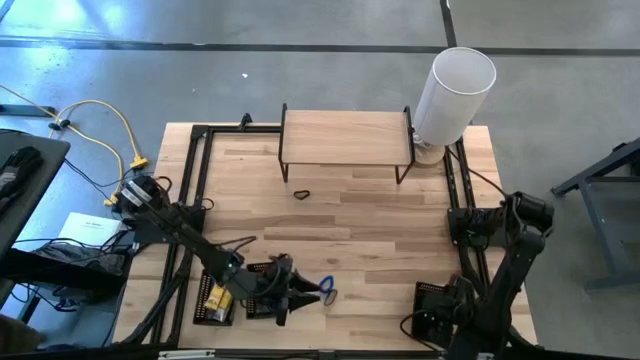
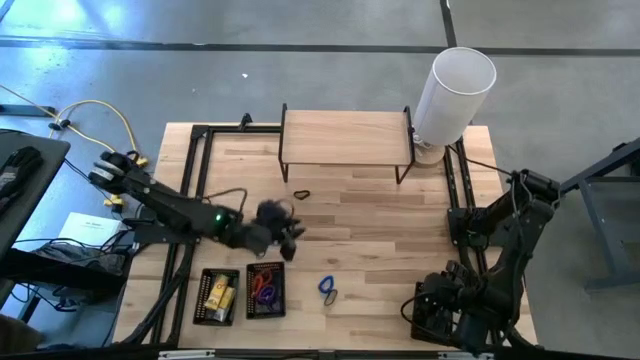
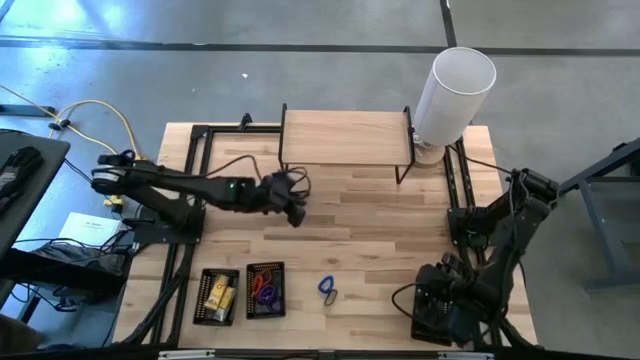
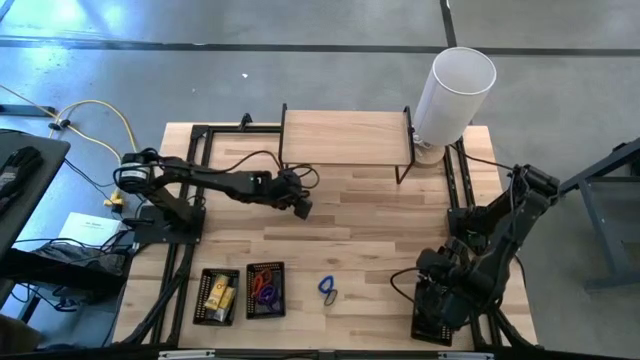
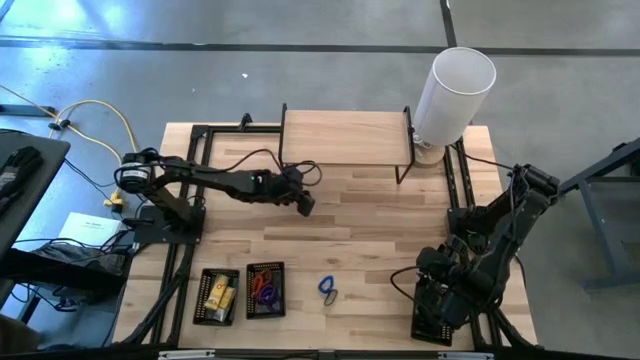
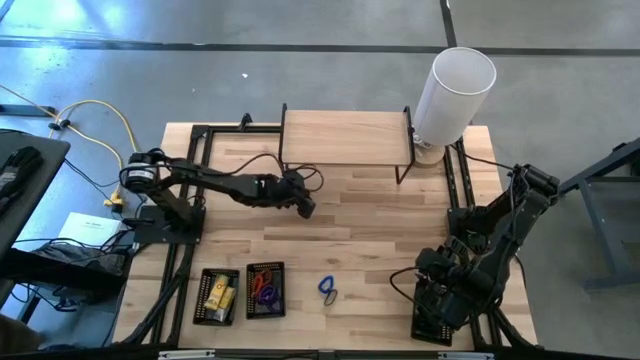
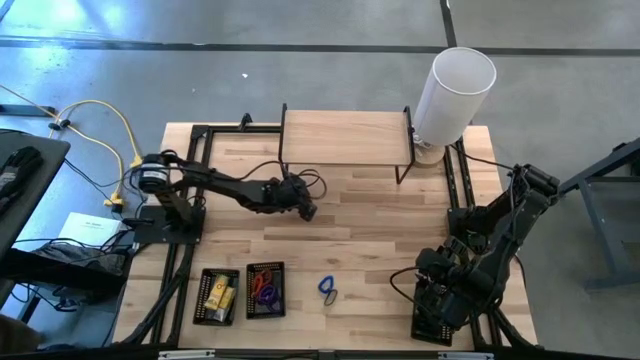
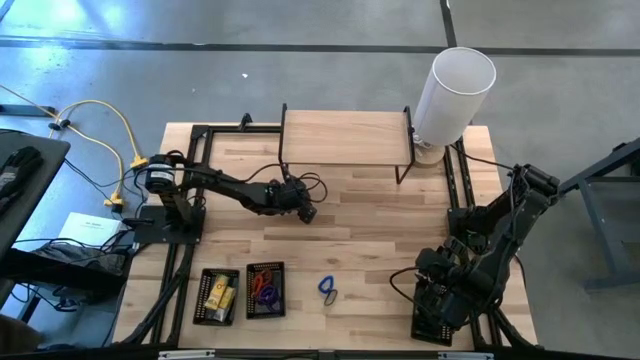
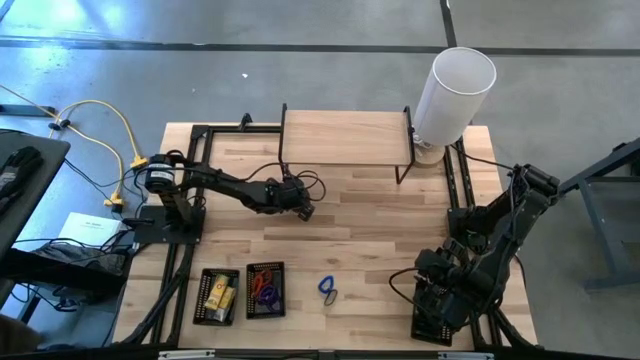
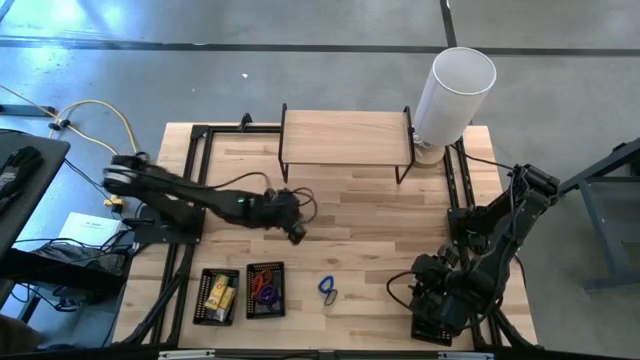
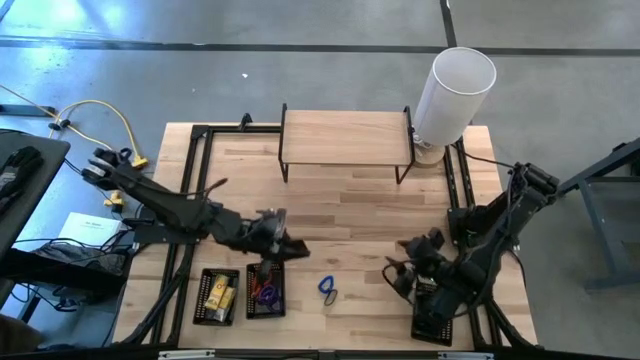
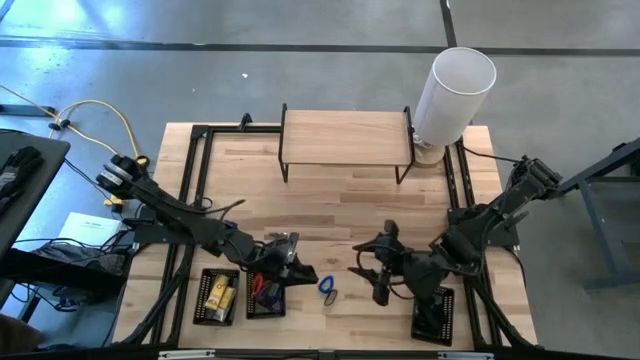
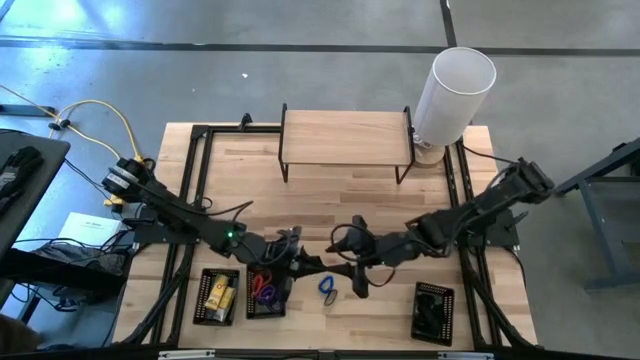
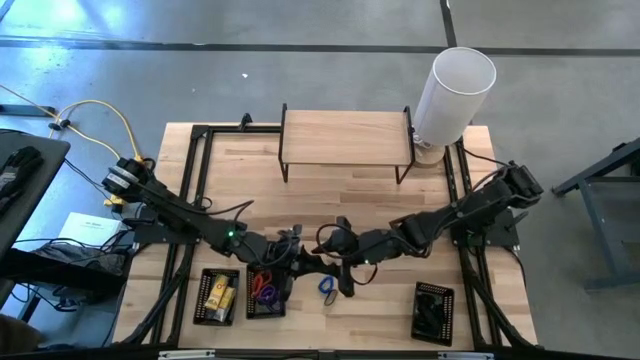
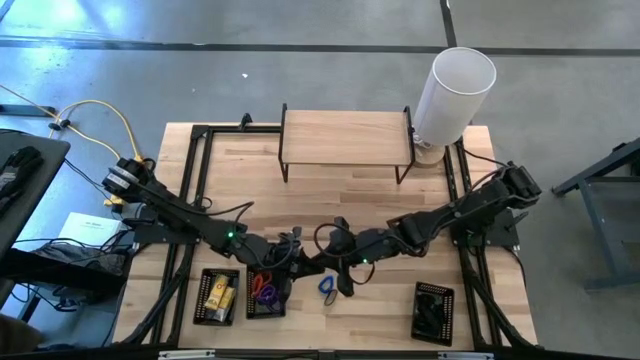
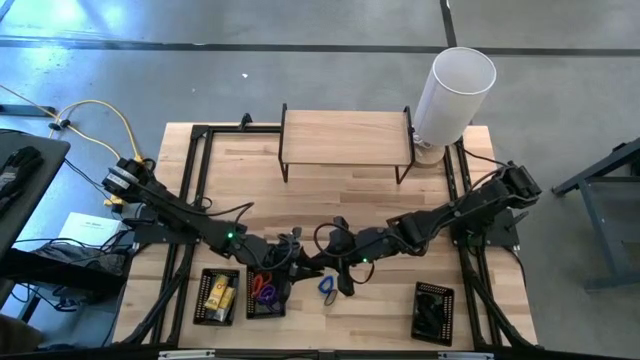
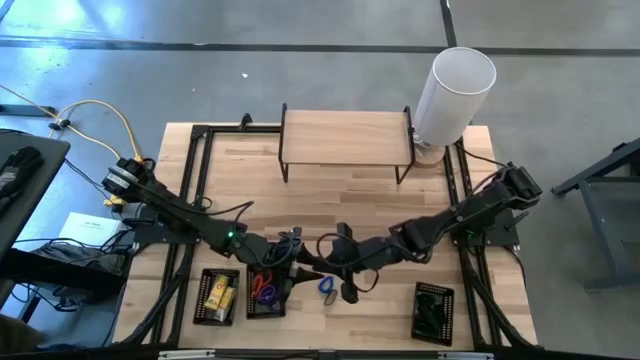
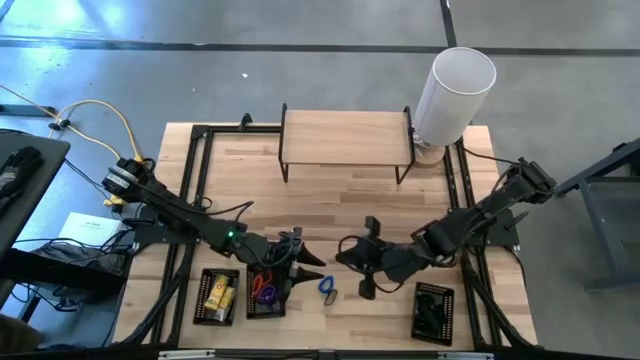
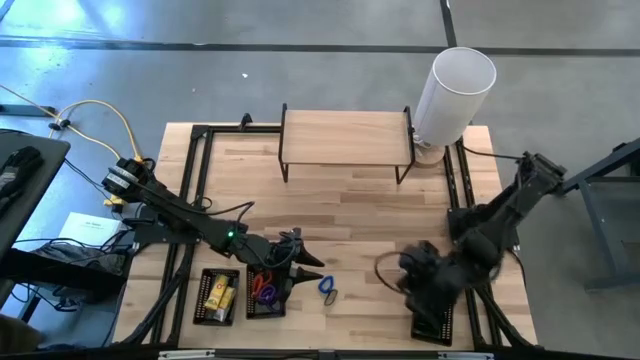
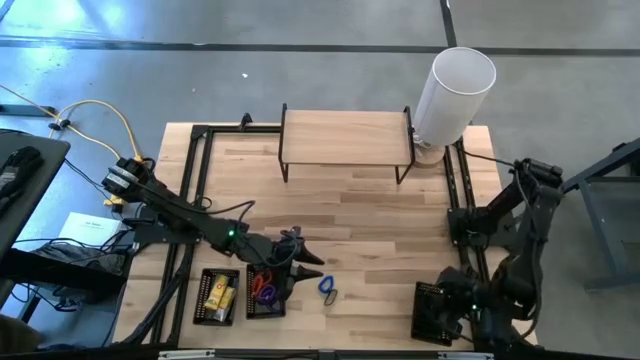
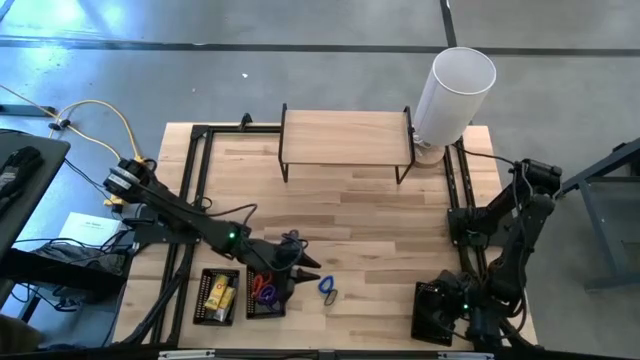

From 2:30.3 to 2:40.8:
Task: Pick & Place Office Desk Supplies
Put the black rubber band into the right black basket

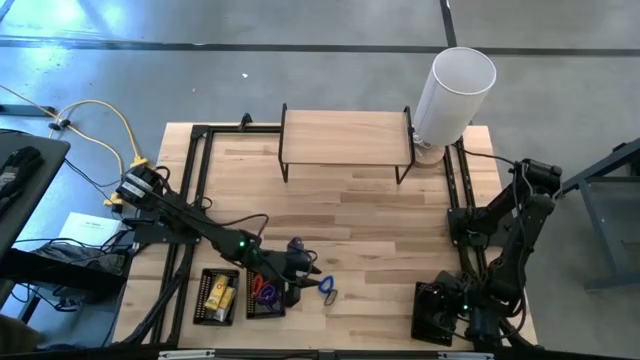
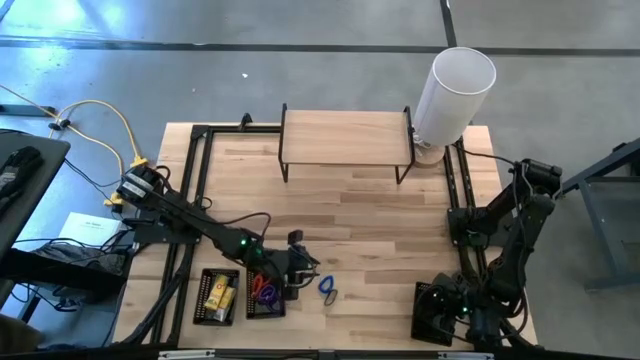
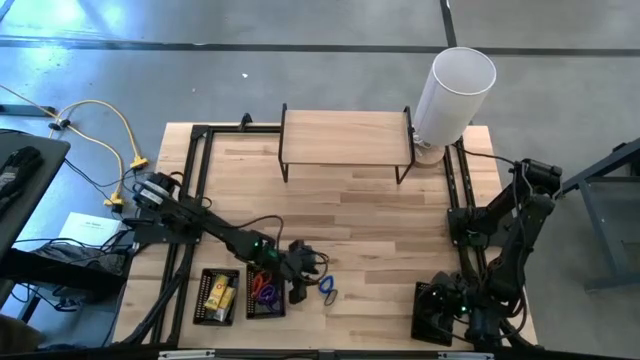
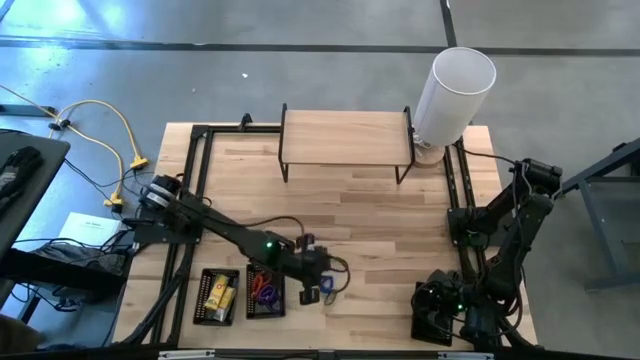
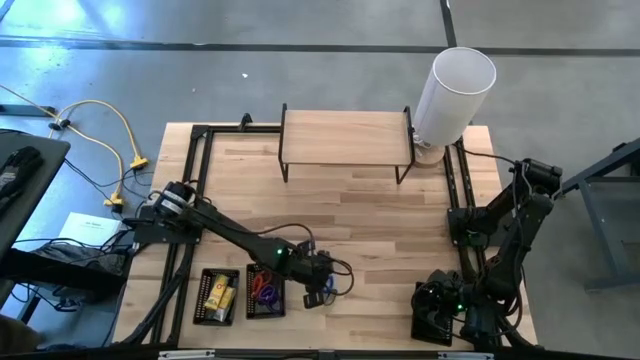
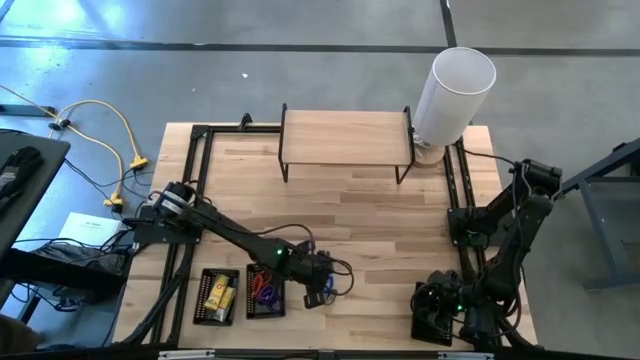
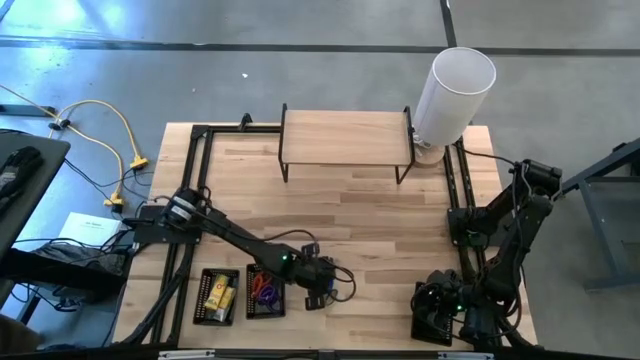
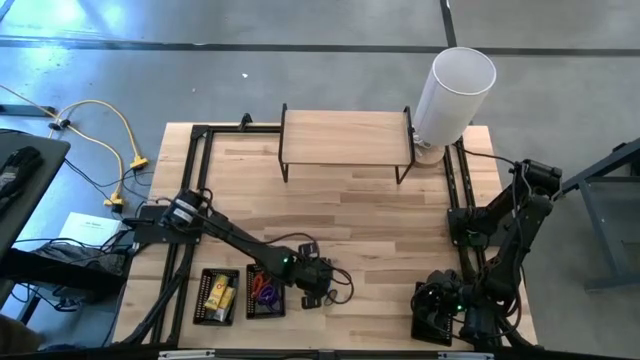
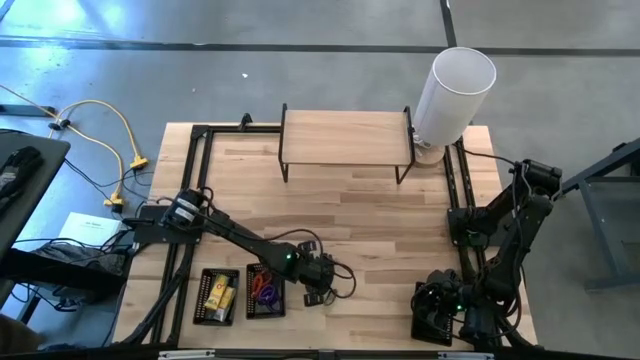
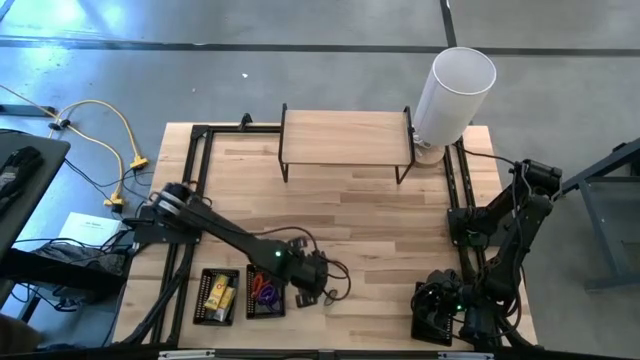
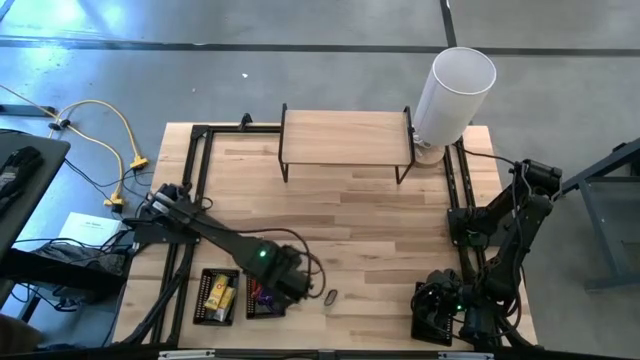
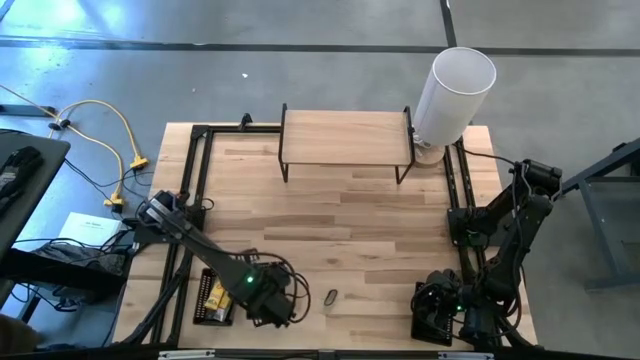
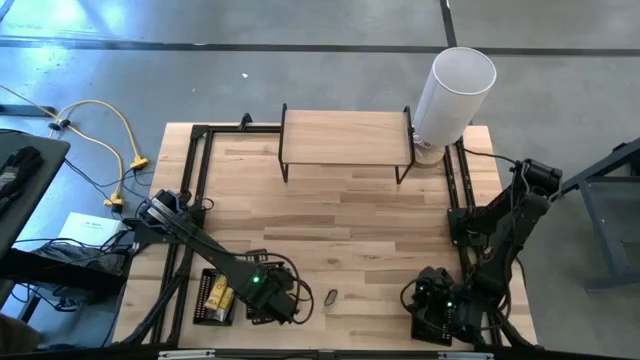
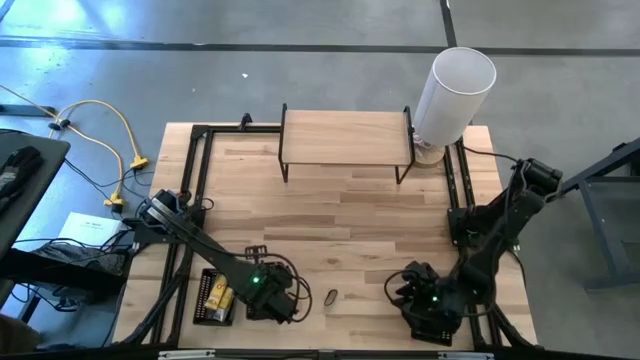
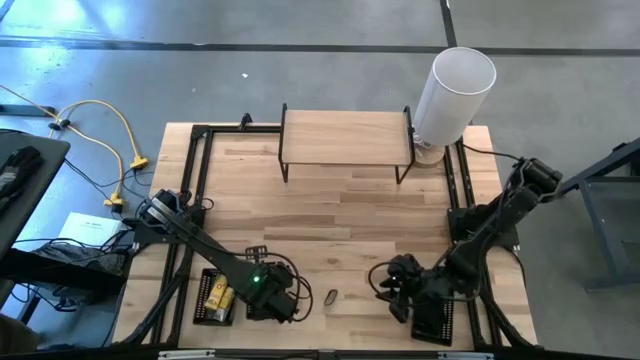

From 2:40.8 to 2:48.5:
Put the blue spring key chain into the middle black basket

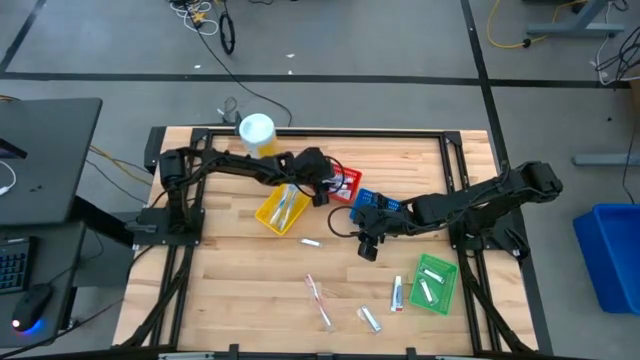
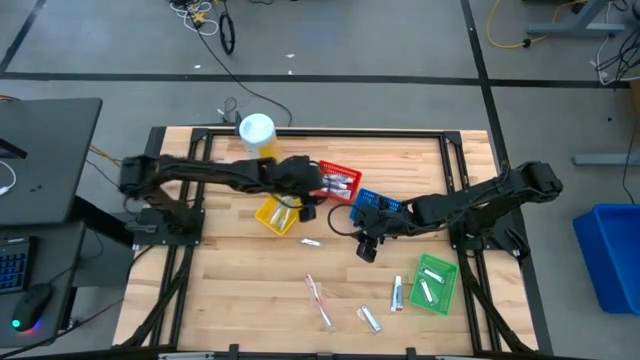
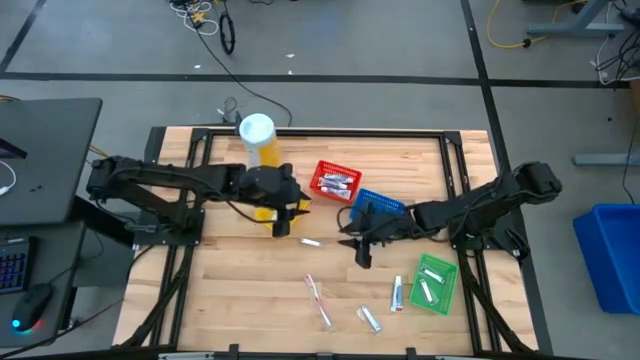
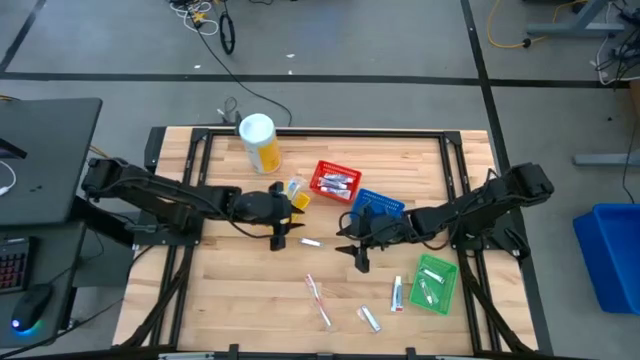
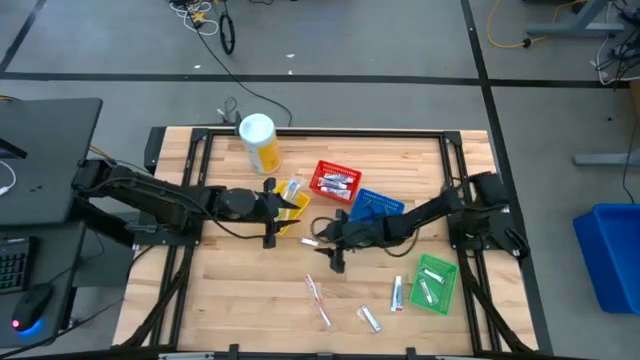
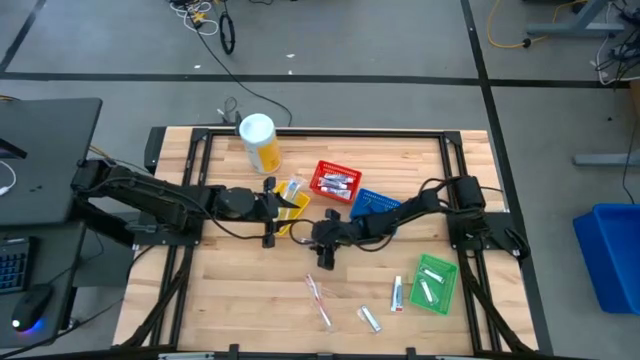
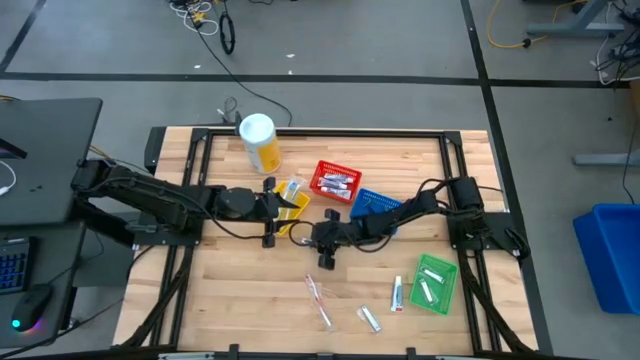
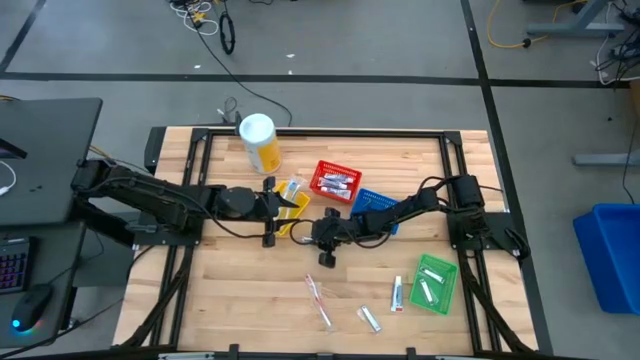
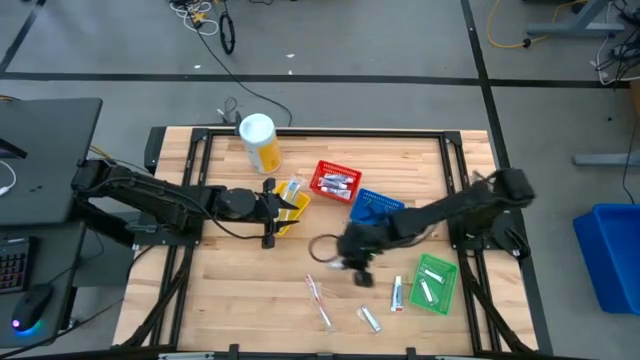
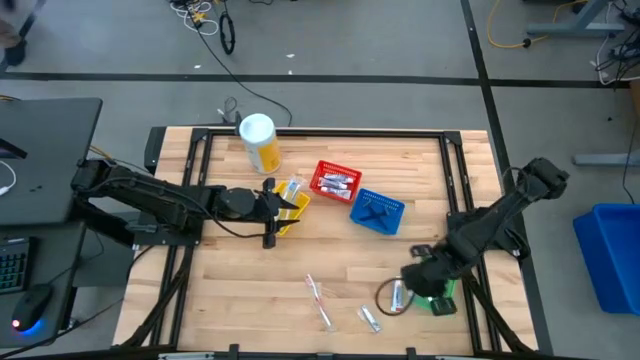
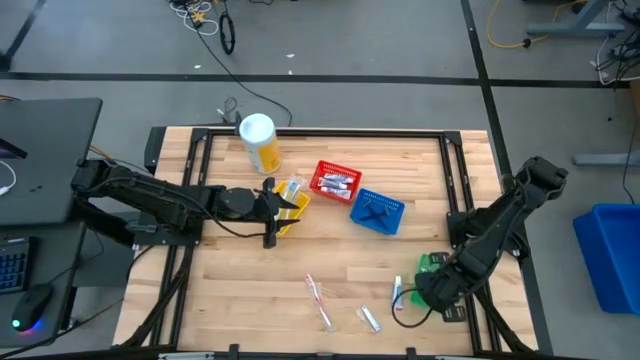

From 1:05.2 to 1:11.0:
Task: Pick & Place Travel size toiletries
Put the silver nail cutter into the green bin
